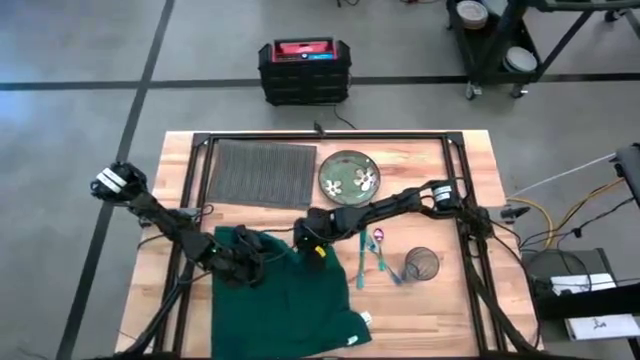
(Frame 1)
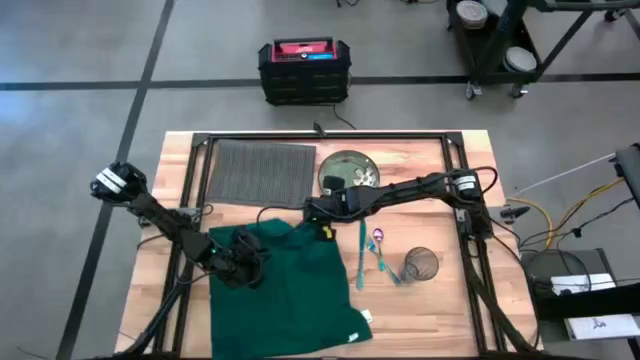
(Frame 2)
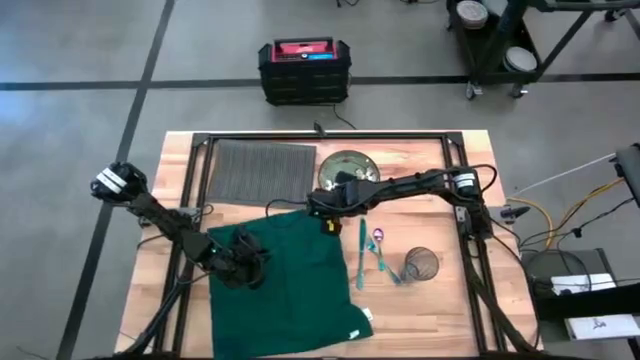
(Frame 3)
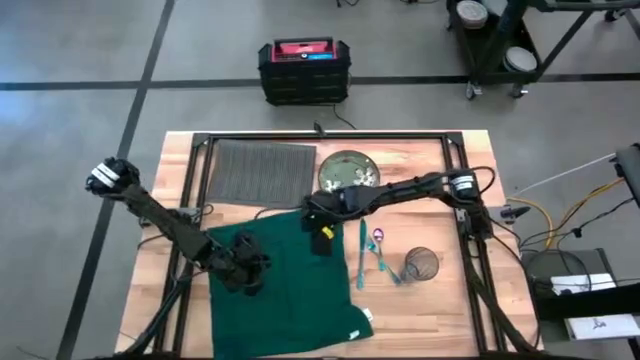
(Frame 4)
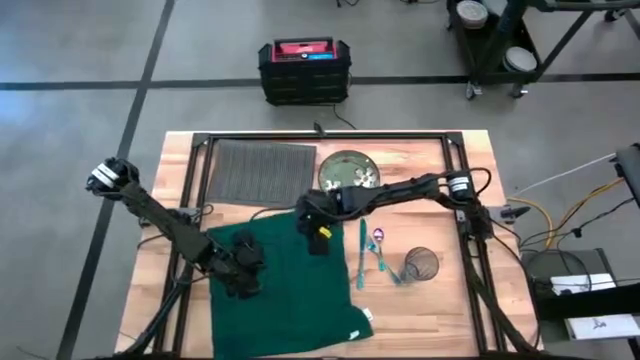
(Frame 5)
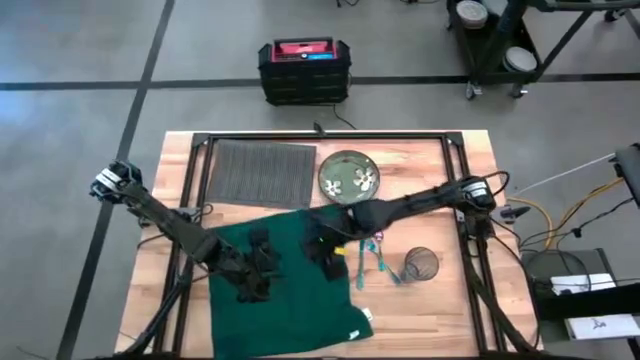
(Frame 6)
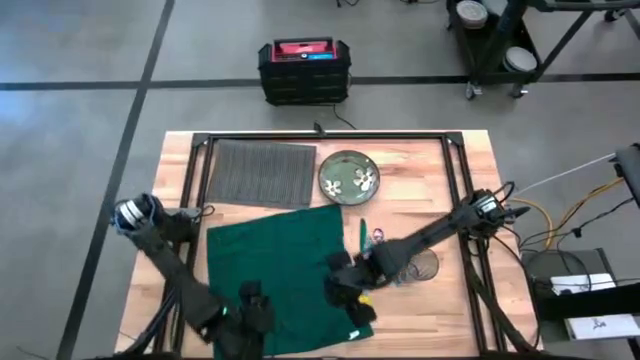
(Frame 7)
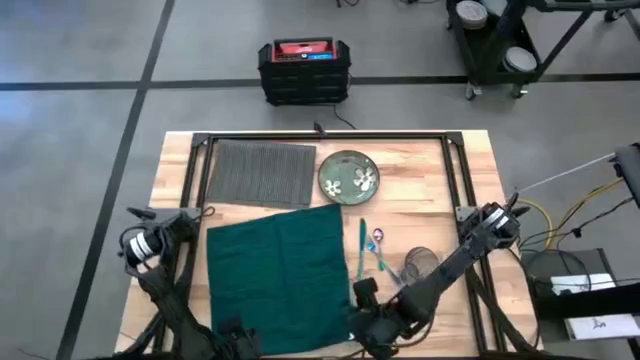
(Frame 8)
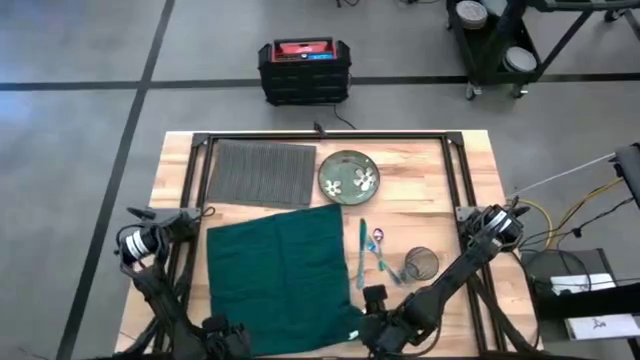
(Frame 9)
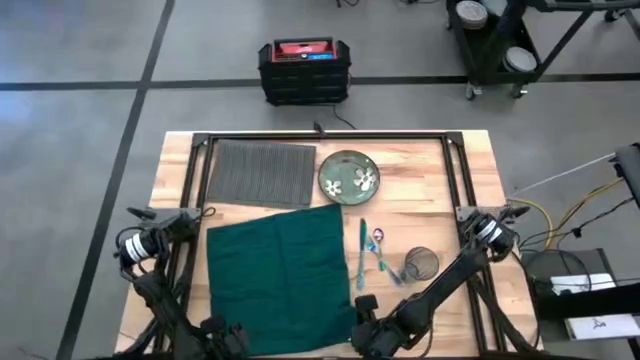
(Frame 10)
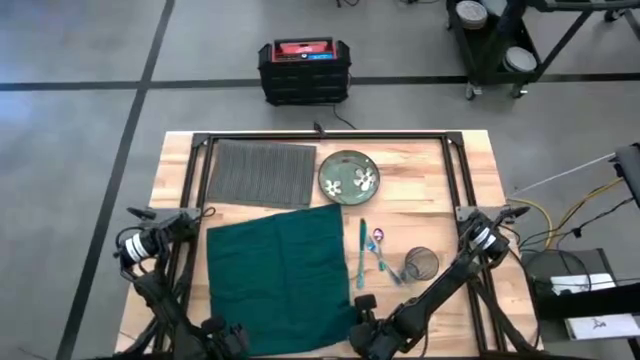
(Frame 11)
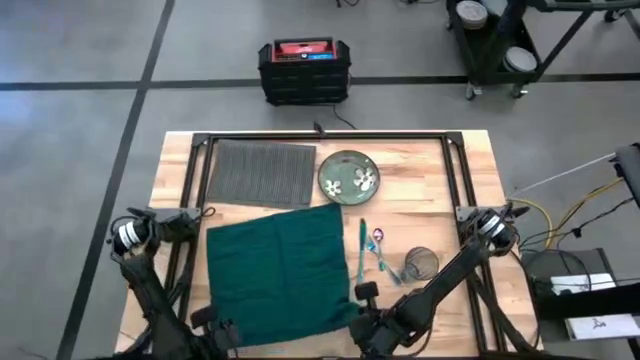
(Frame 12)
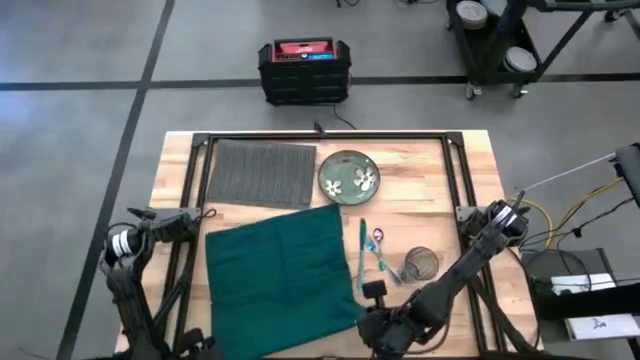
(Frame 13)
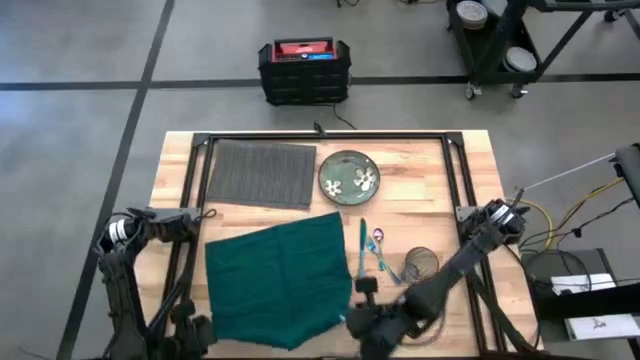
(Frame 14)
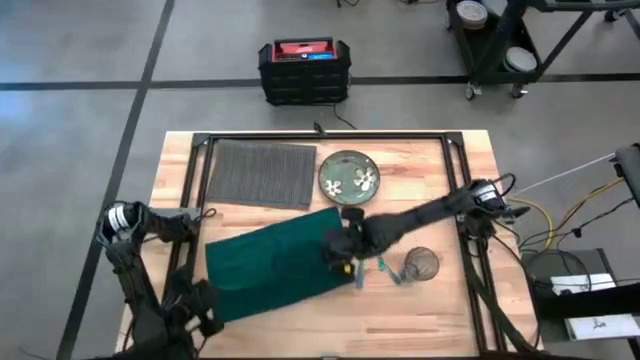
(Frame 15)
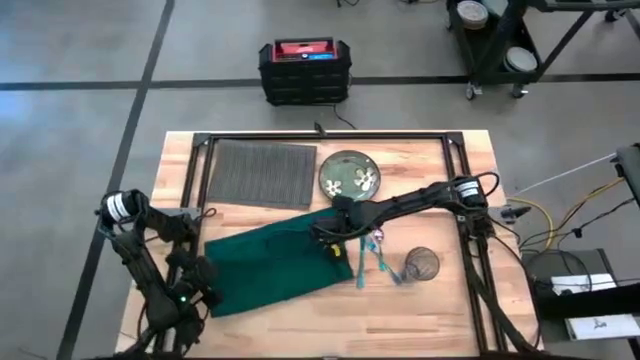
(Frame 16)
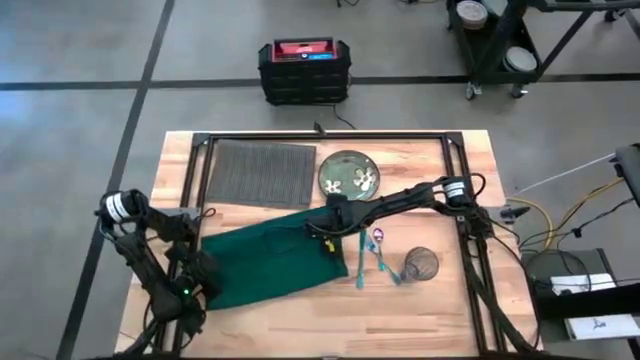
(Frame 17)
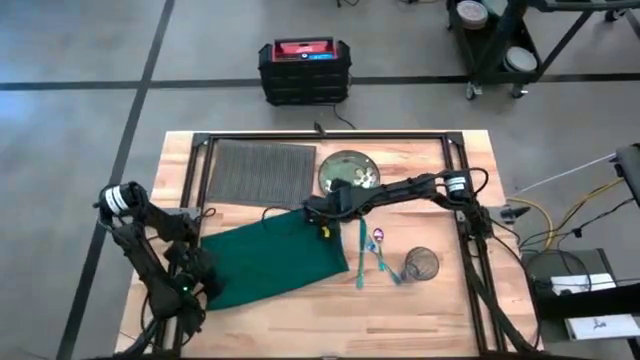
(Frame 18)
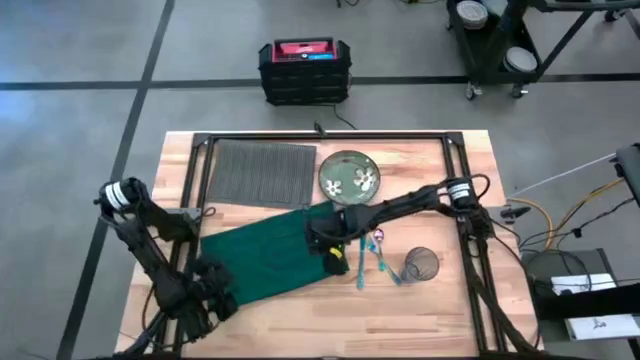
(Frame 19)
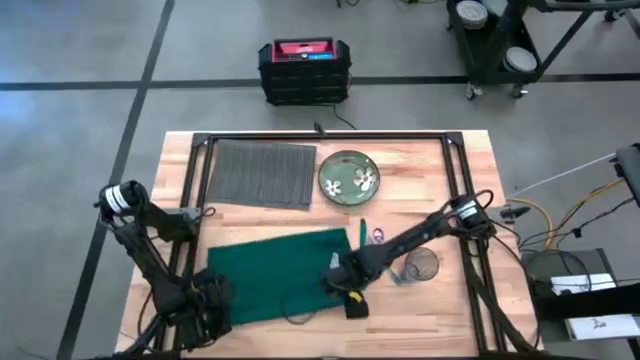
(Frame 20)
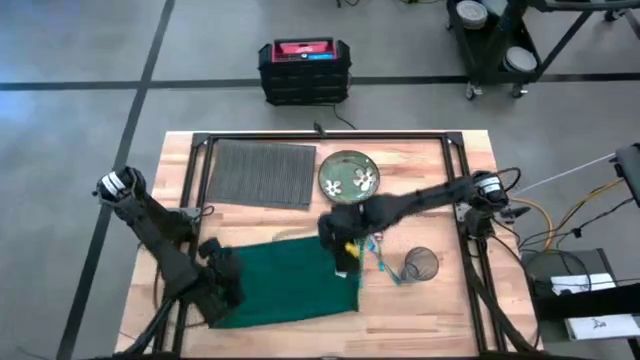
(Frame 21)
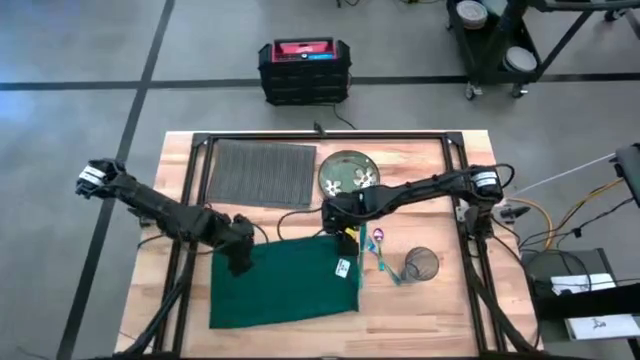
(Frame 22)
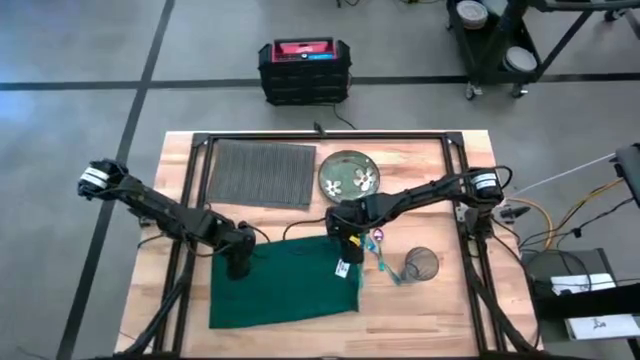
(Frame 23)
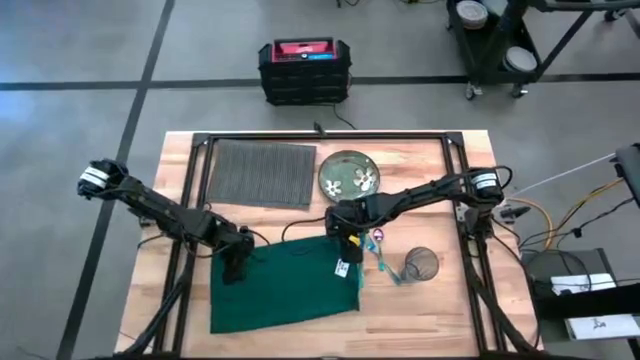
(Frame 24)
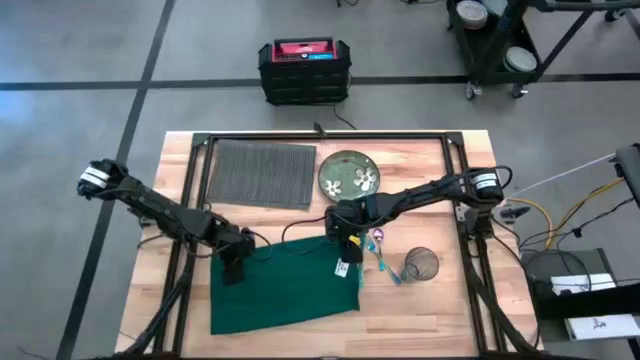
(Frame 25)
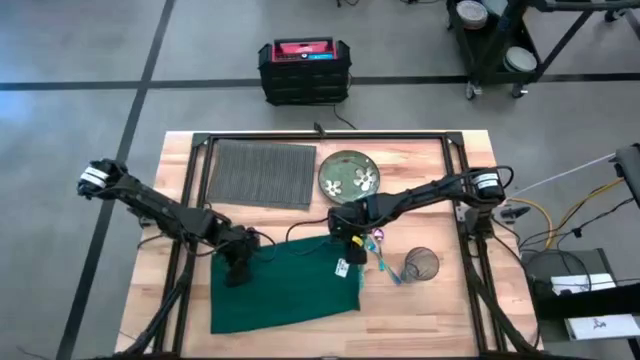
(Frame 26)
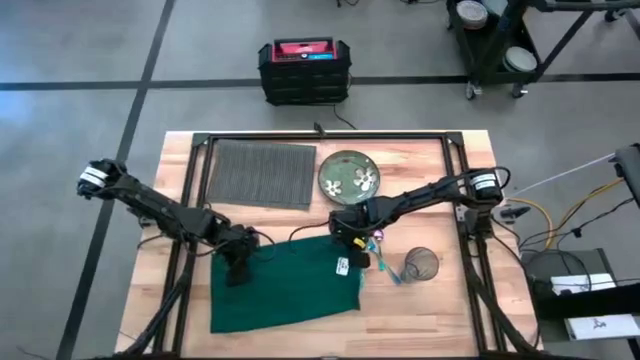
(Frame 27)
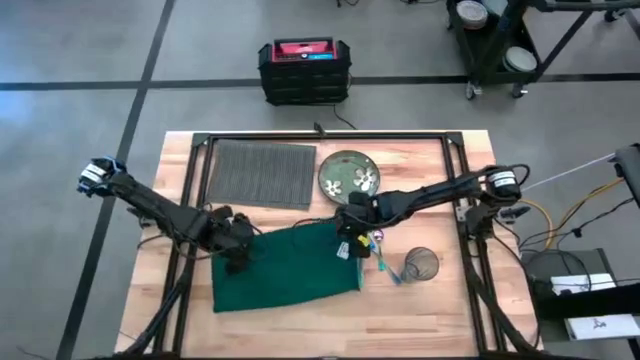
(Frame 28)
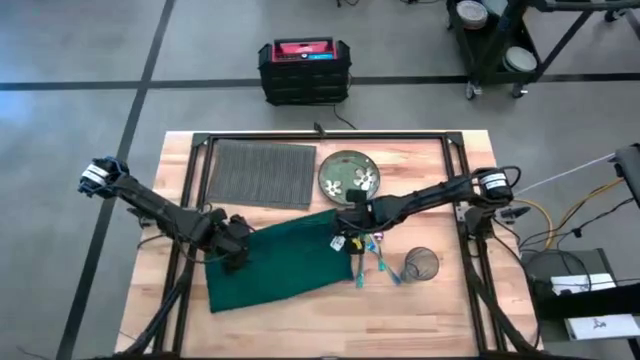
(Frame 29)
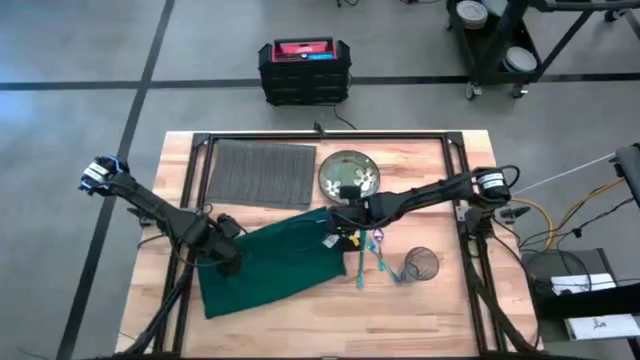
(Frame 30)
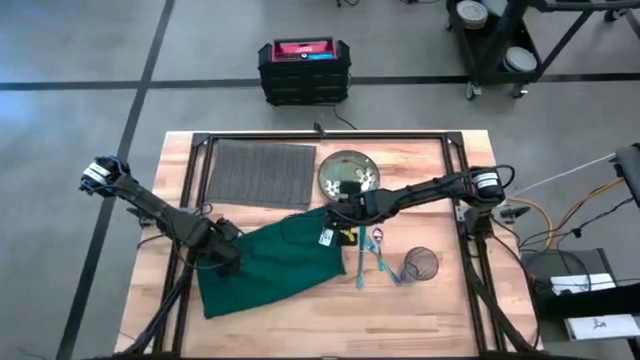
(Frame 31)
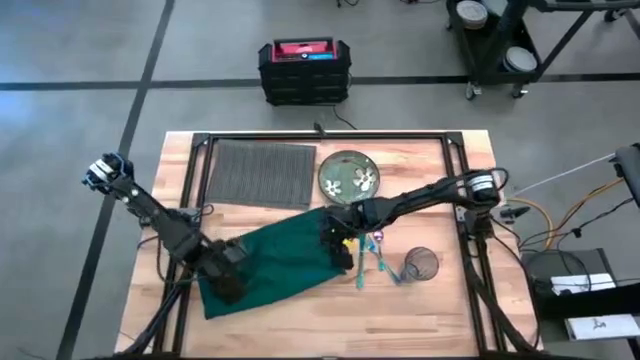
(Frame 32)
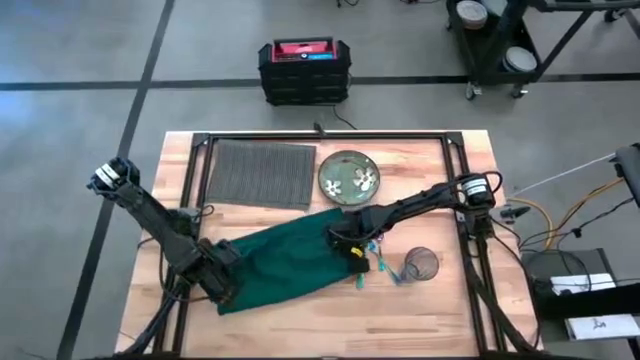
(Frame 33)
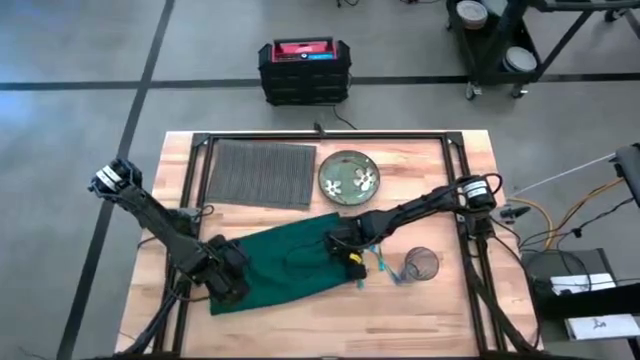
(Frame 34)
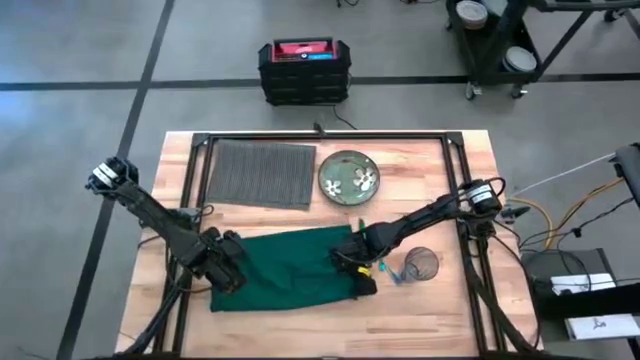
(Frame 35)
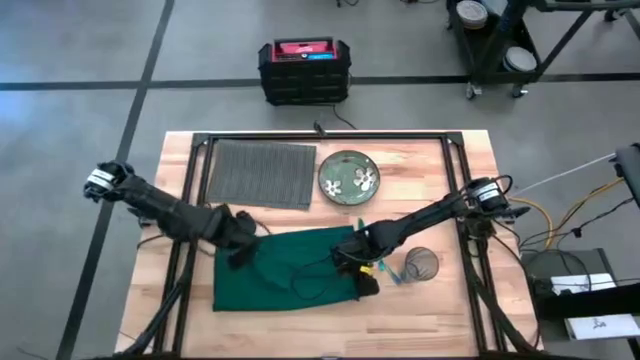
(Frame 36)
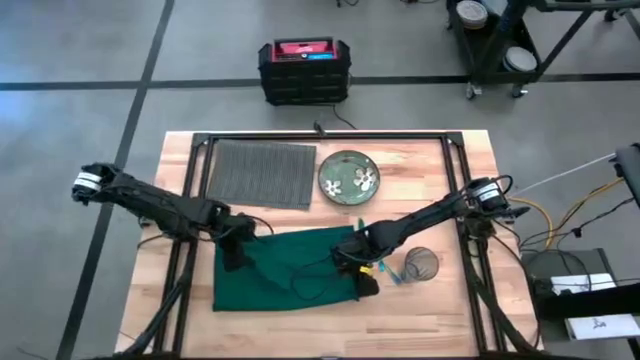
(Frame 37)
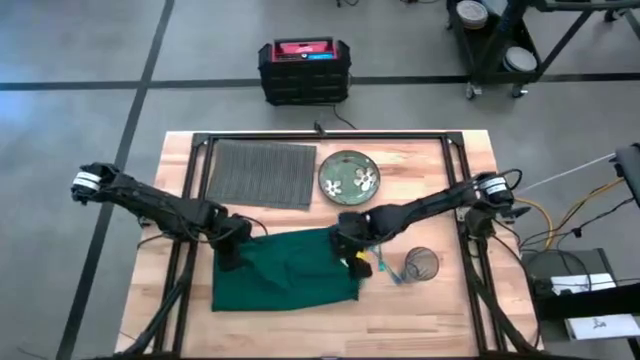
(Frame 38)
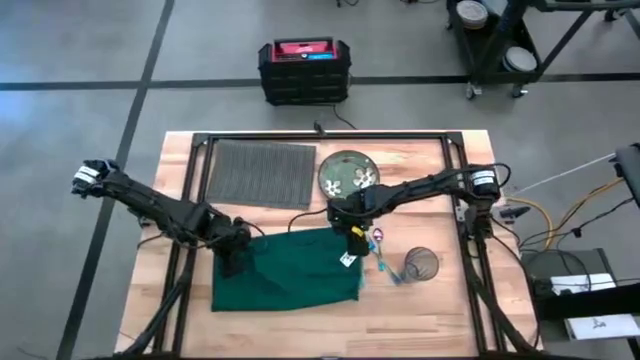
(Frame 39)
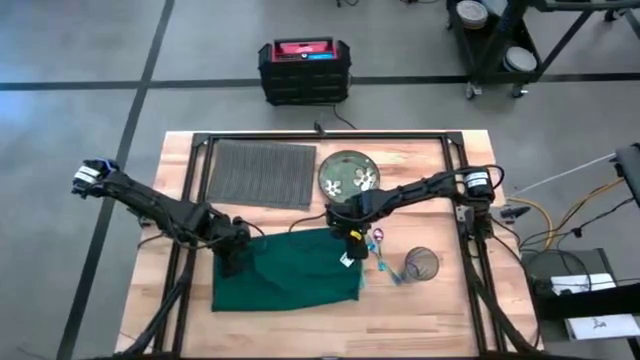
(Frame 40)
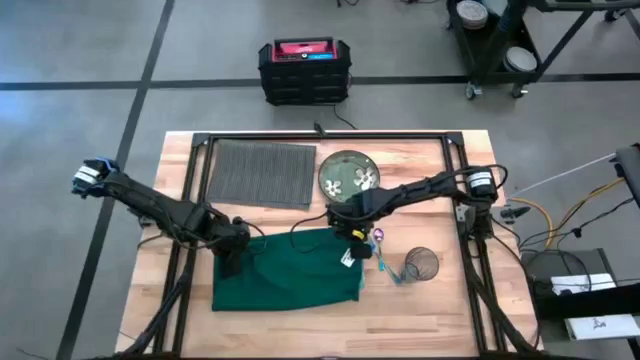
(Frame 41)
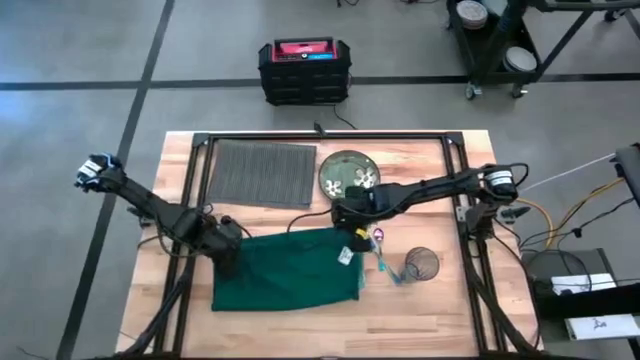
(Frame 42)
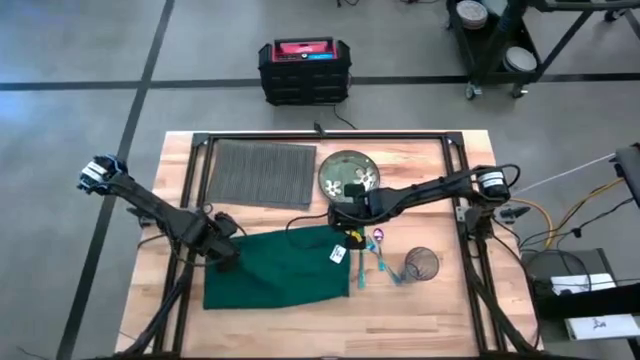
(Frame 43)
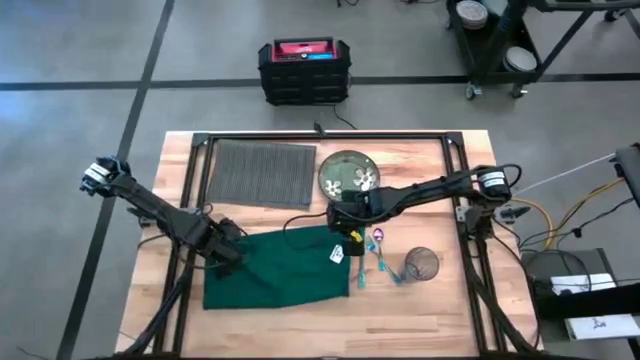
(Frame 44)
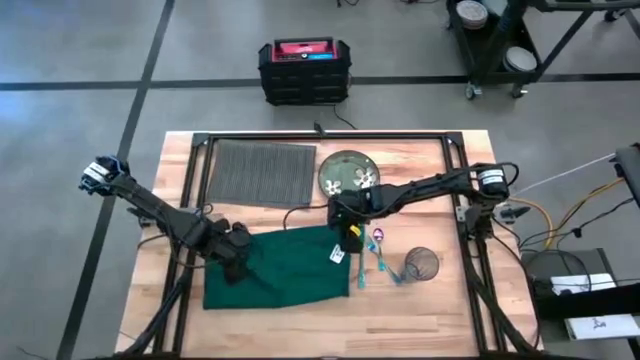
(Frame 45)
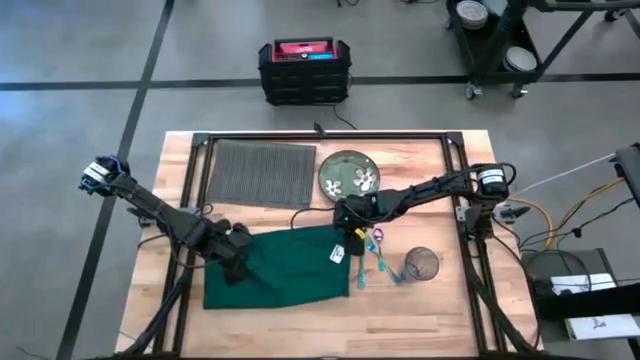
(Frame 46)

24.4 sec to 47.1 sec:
Task: Set table place
Fold the green napkin
